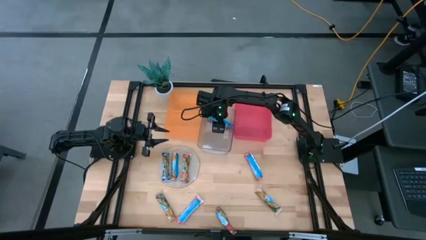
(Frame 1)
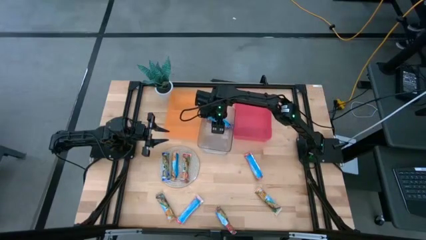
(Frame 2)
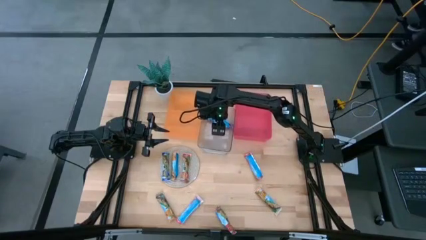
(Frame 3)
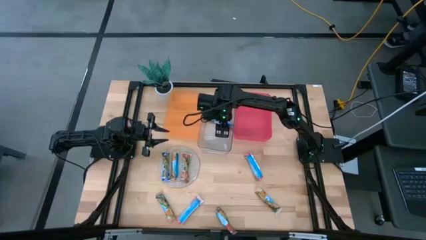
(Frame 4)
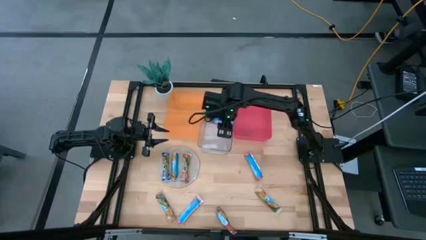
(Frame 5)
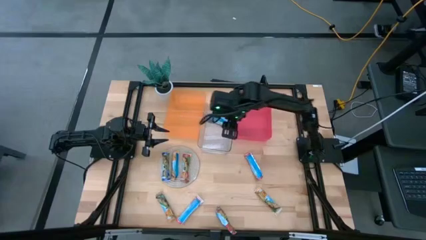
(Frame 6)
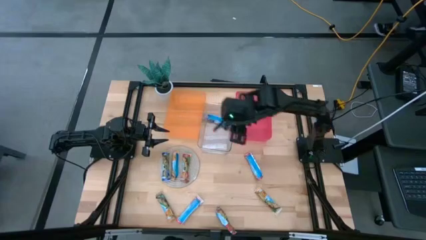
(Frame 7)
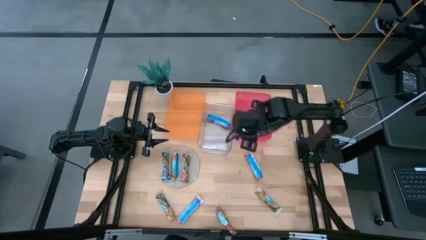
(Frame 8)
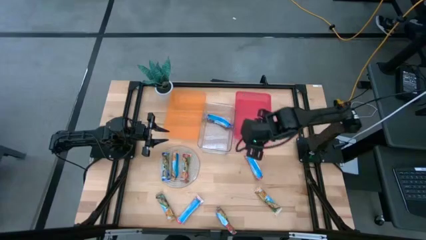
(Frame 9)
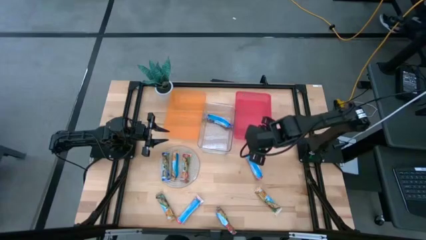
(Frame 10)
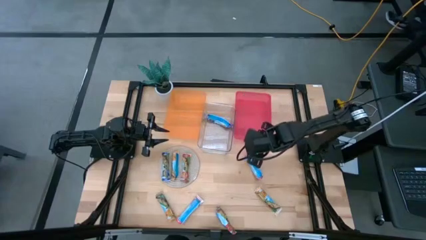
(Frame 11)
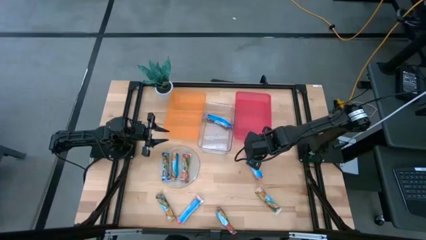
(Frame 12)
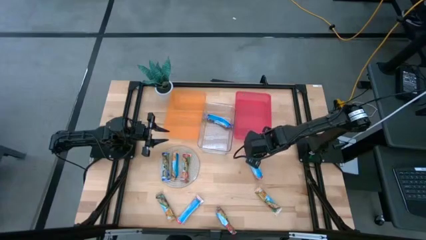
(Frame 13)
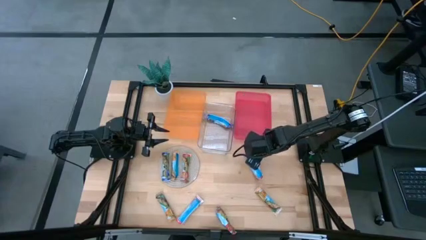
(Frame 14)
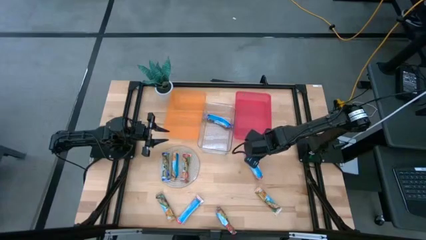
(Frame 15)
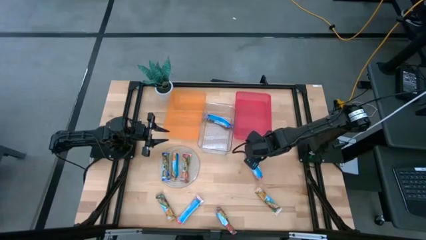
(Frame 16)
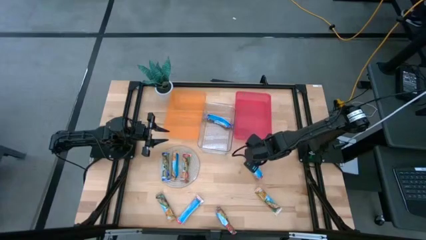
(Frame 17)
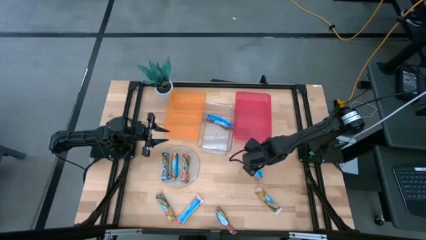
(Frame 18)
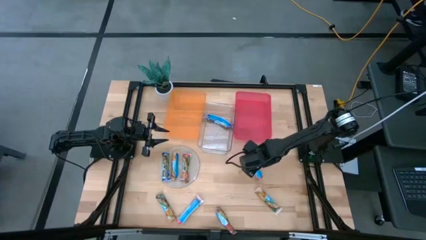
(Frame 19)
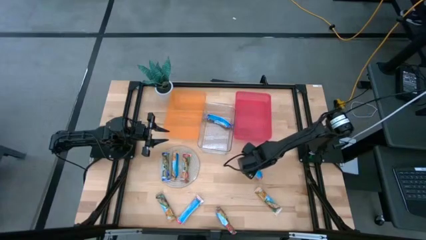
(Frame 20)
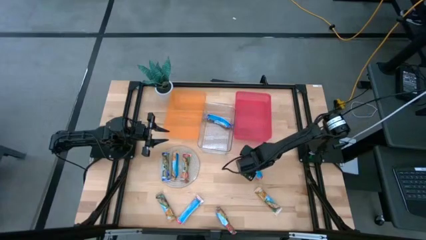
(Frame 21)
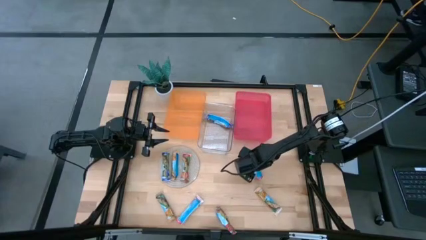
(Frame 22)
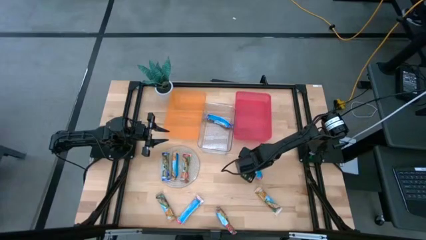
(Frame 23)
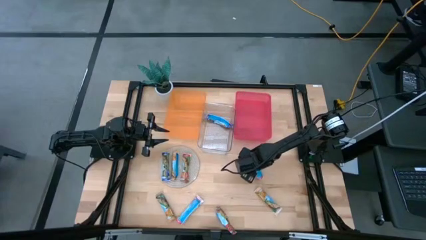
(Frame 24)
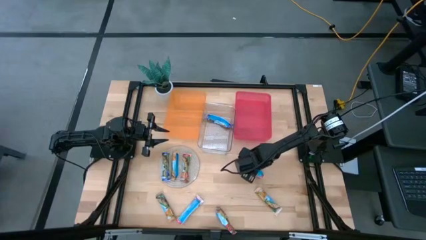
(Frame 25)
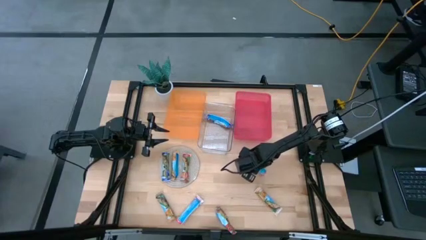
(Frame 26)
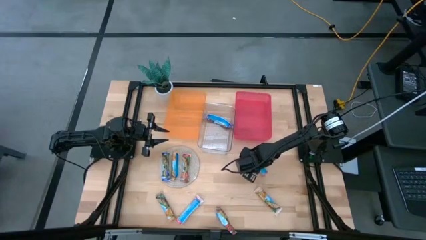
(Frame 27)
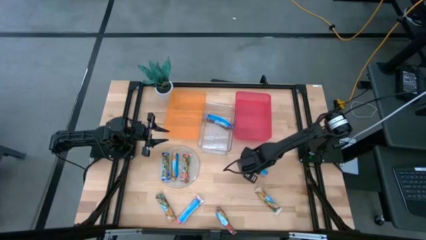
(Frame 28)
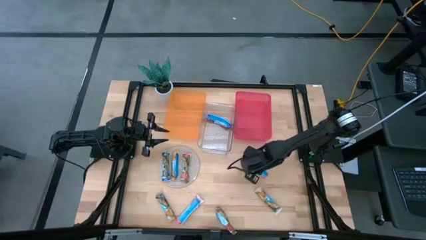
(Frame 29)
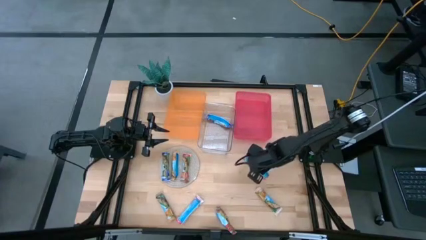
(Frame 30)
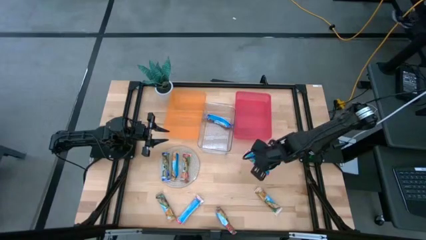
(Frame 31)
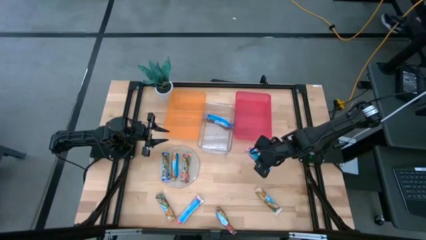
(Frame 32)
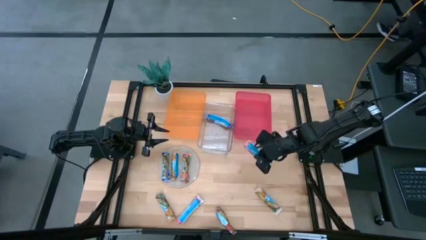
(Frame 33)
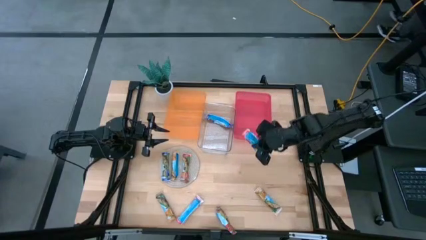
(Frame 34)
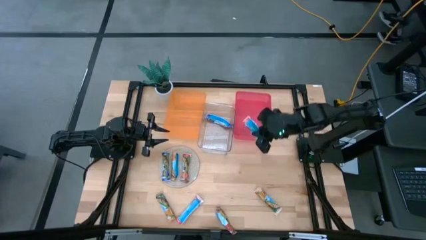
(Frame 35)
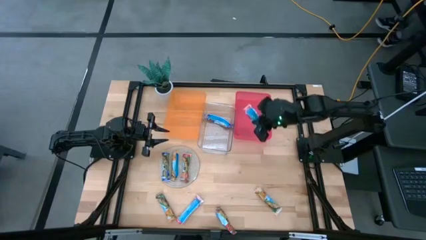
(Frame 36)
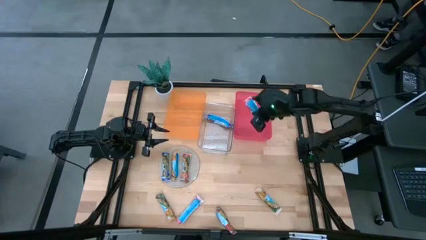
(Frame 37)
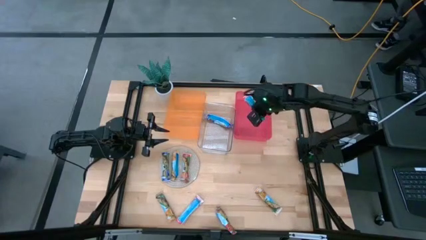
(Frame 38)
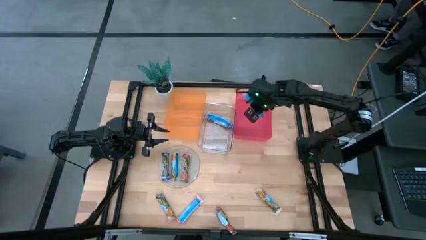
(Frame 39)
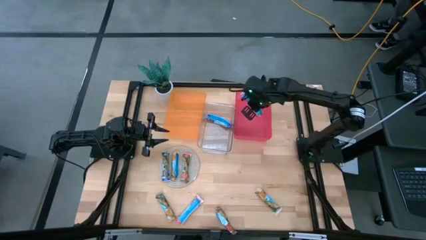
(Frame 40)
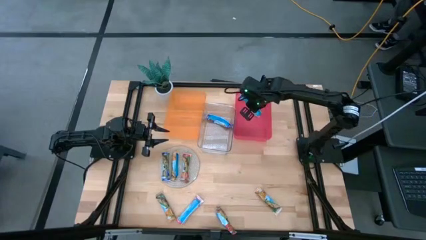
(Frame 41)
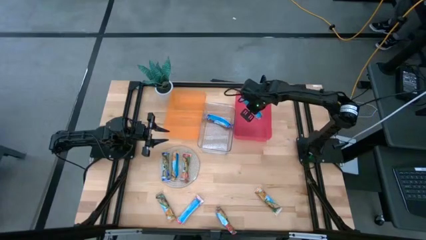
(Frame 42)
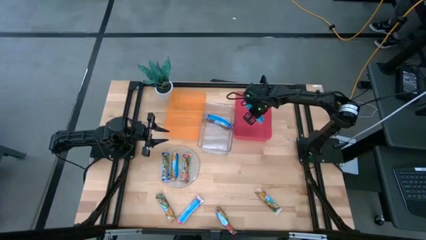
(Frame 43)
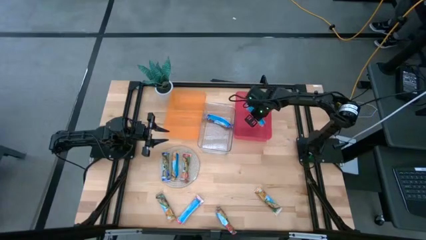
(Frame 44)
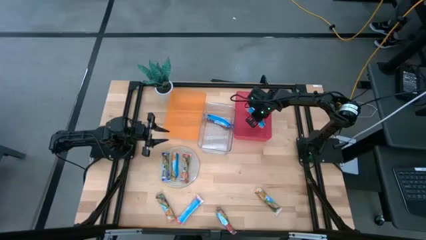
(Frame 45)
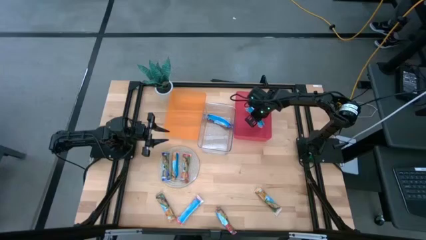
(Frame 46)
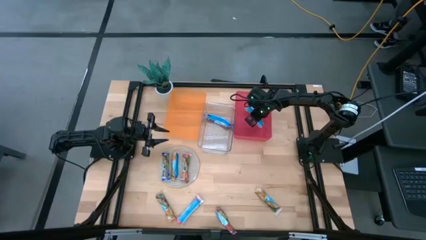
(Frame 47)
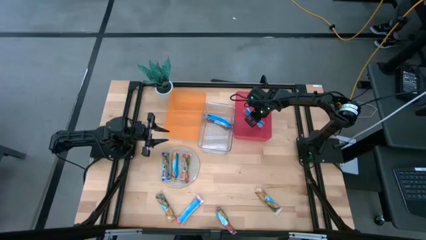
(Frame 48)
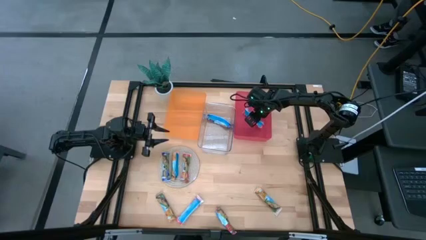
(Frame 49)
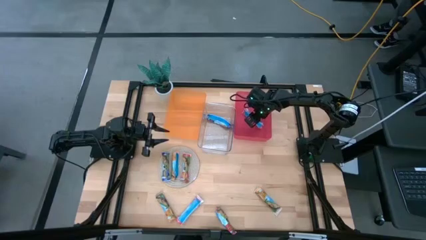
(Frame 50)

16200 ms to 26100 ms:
Task: Pick and place Granola Bars by type
Put the top right red granola bar into the red bin

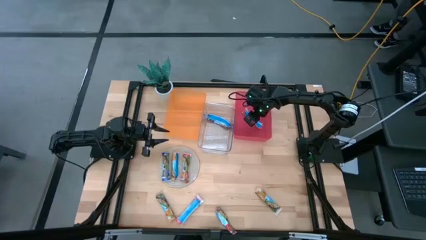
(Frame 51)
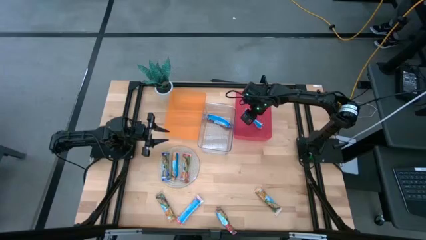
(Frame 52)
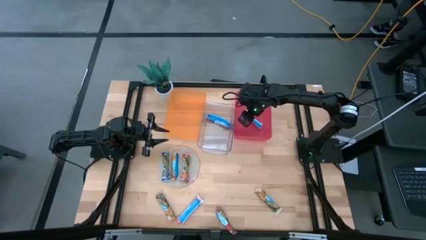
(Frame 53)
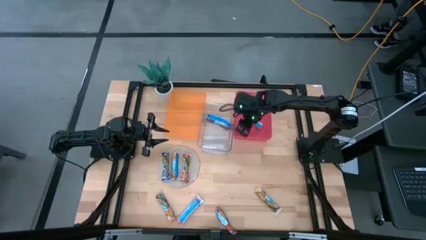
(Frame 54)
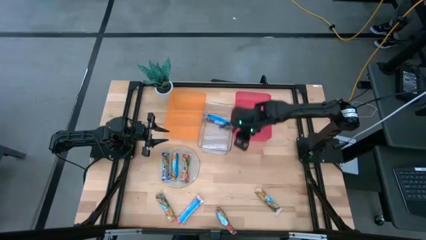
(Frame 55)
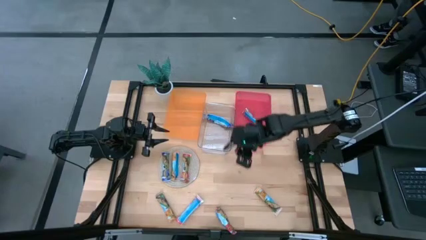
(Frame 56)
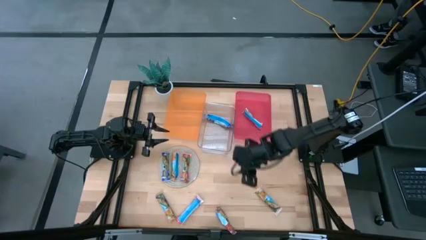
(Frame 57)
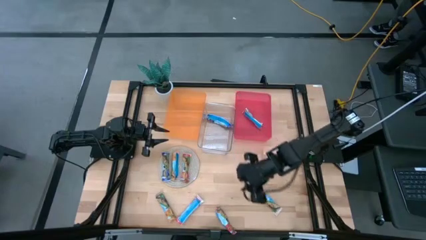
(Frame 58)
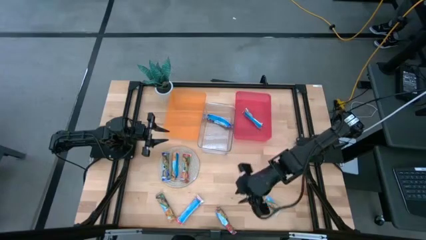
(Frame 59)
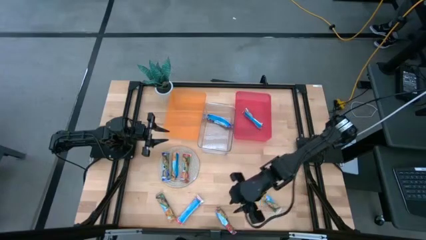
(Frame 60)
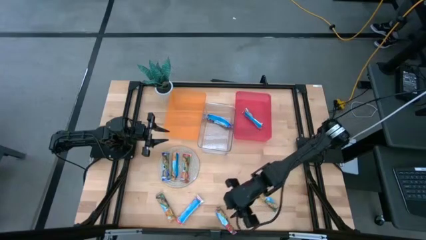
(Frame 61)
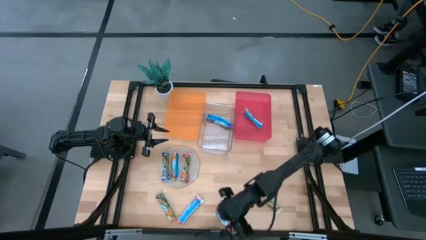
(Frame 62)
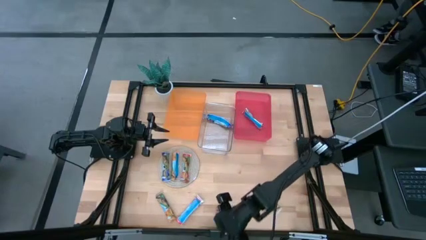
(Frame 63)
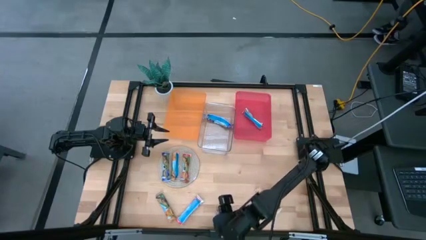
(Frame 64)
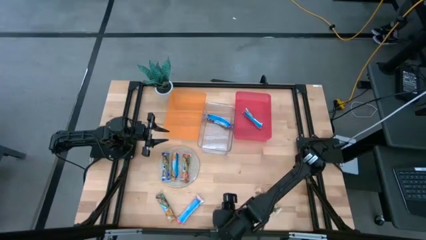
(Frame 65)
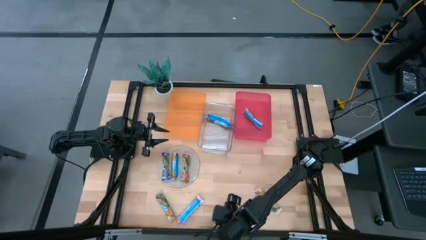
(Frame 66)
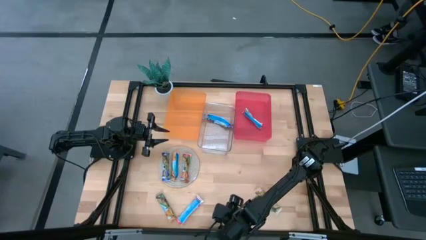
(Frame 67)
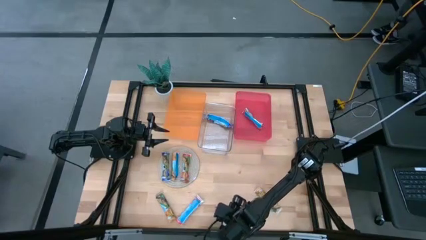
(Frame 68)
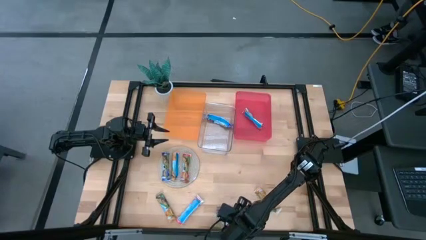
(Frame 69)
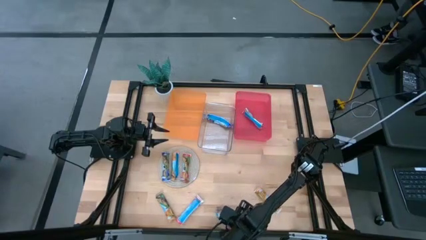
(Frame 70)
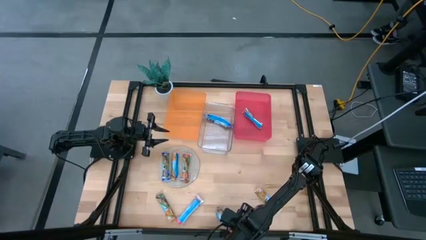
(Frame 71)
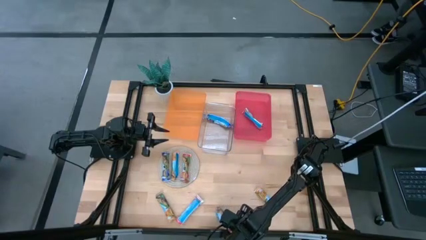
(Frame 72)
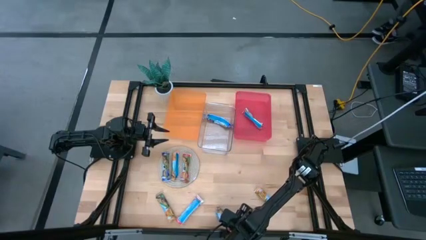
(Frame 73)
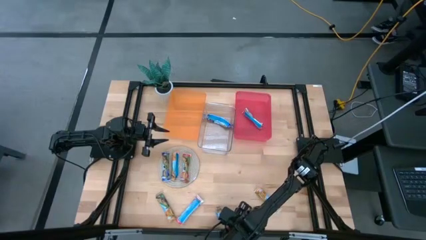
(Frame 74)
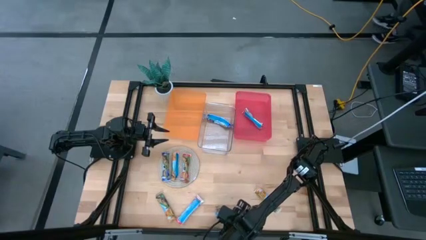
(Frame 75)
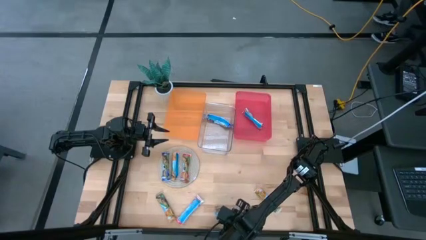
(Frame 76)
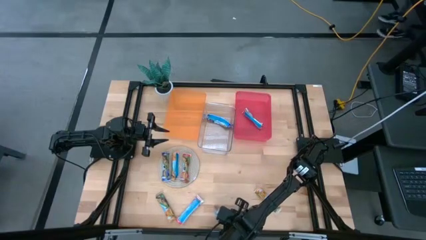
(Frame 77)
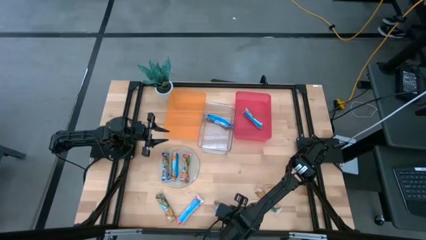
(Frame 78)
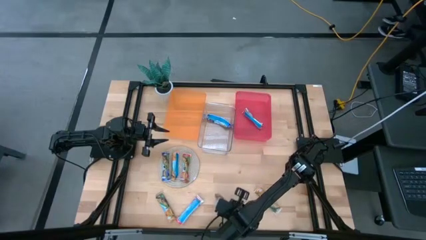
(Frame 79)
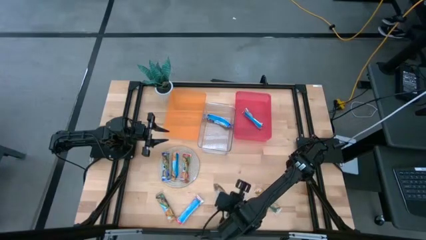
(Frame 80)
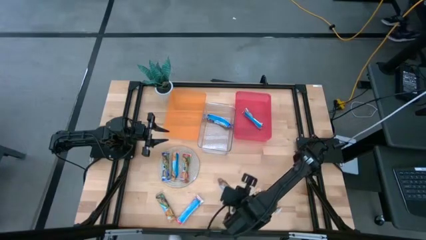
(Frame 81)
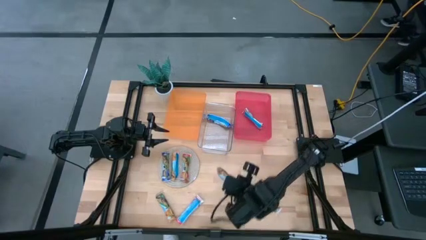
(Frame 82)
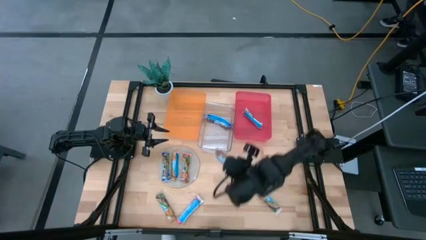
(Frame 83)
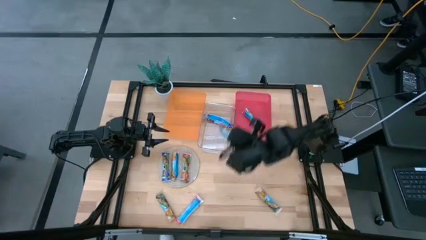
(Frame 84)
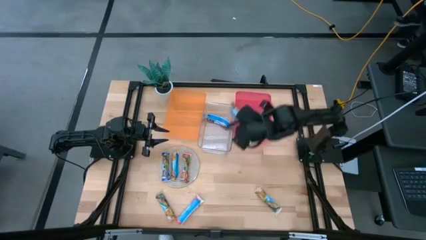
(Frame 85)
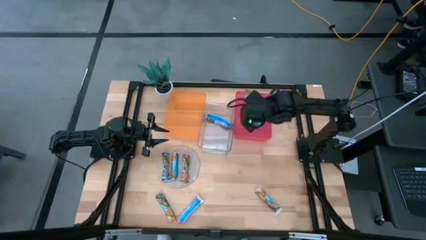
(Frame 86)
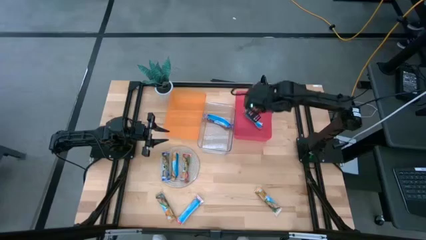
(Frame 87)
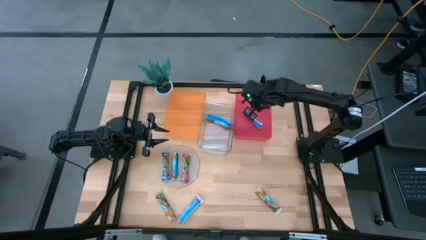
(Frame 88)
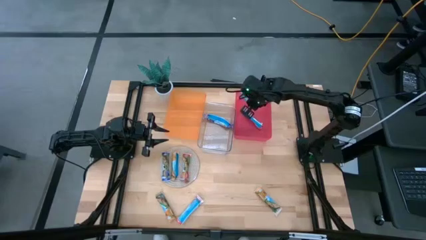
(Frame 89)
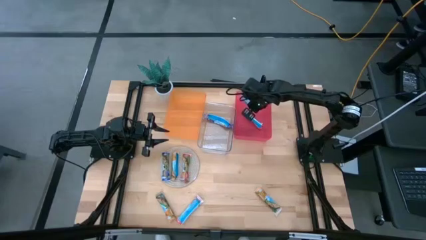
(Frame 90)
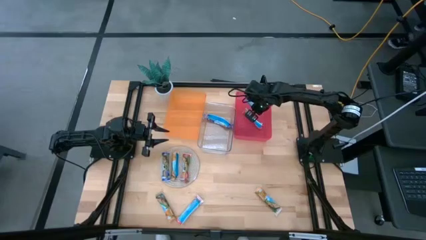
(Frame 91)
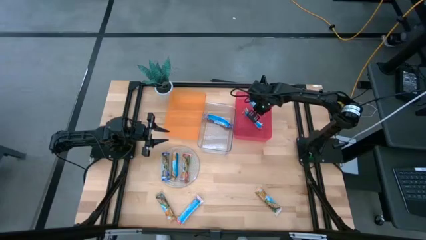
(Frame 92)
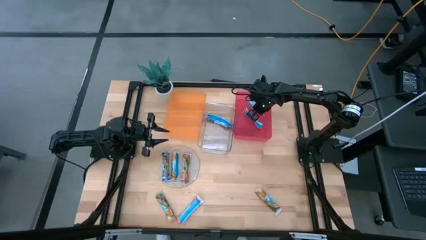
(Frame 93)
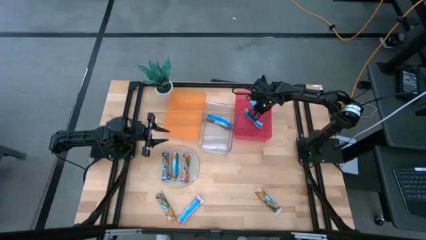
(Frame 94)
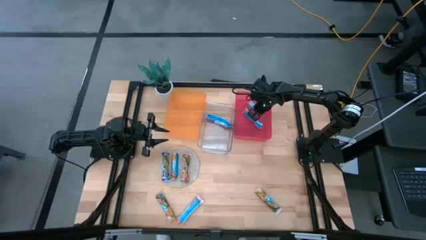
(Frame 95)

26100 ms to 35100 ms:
Put the bottom right red granola bar into the red bin
